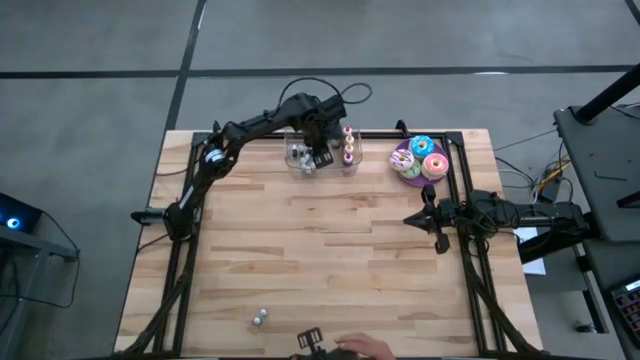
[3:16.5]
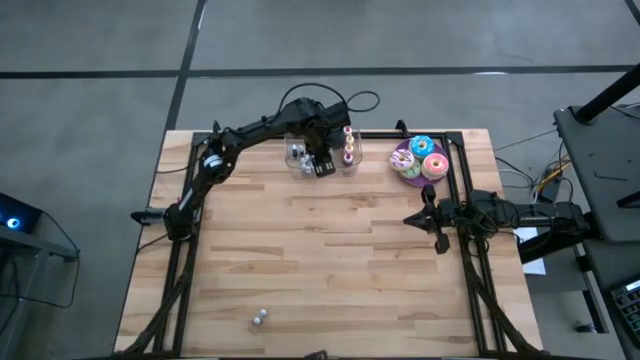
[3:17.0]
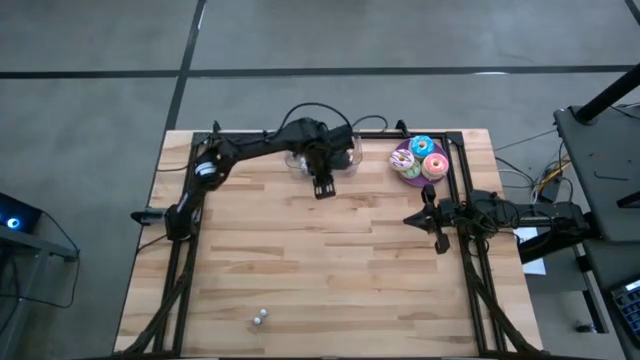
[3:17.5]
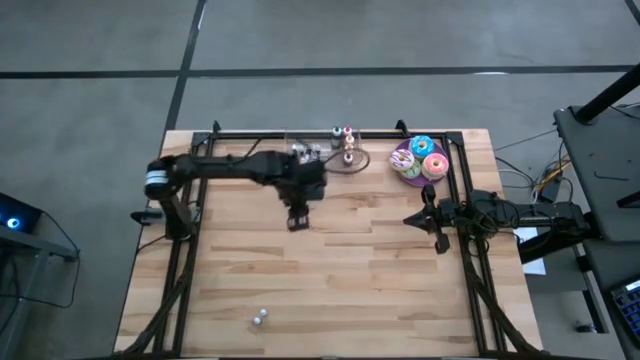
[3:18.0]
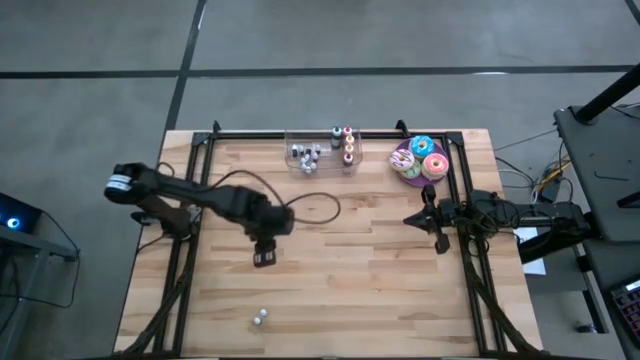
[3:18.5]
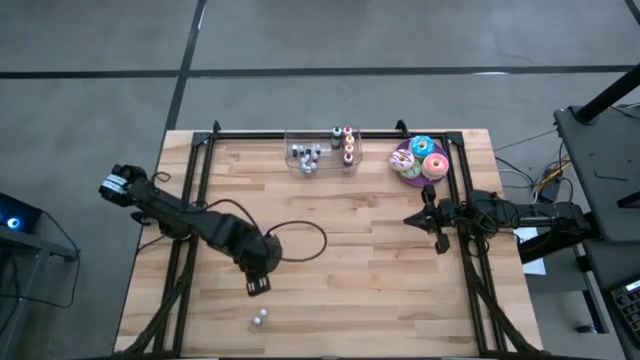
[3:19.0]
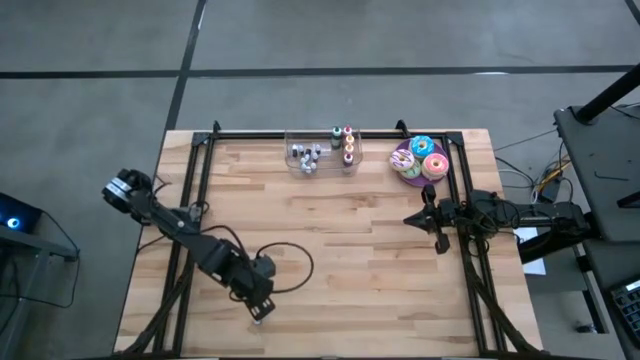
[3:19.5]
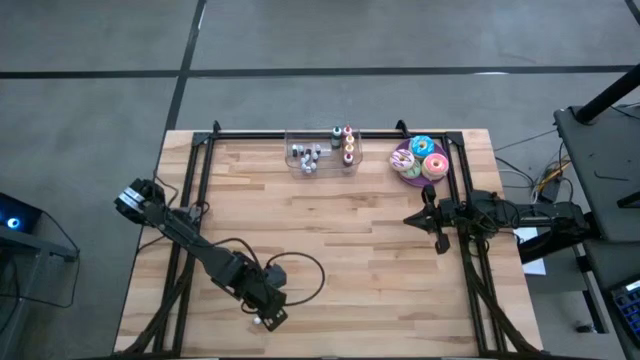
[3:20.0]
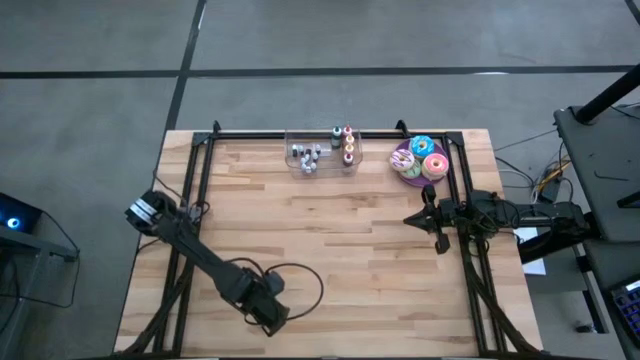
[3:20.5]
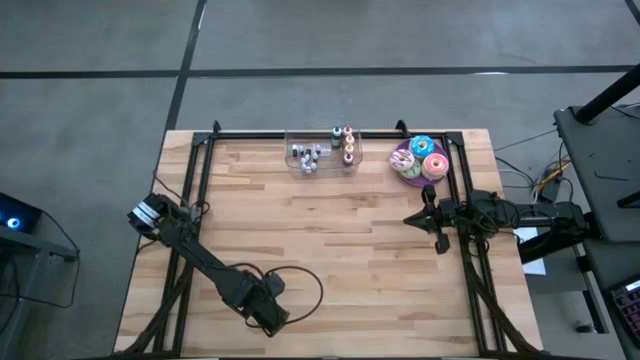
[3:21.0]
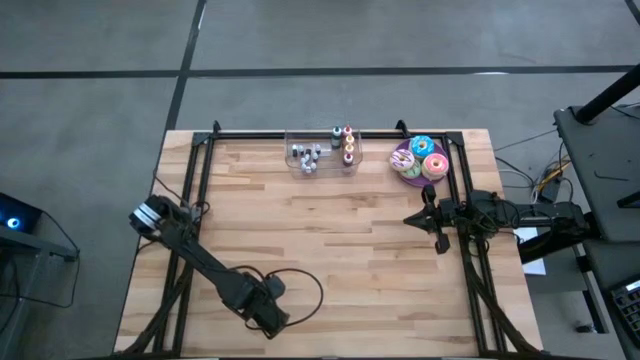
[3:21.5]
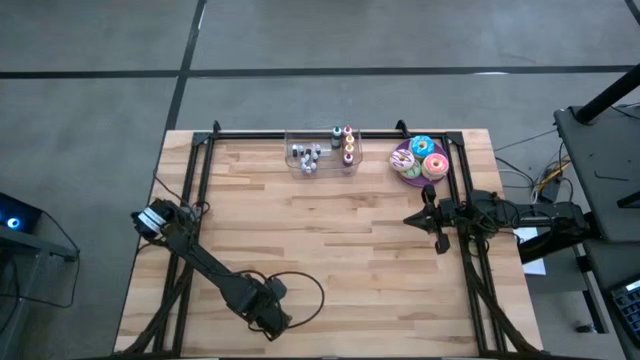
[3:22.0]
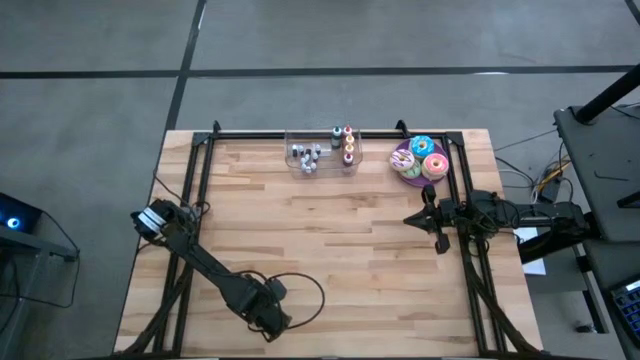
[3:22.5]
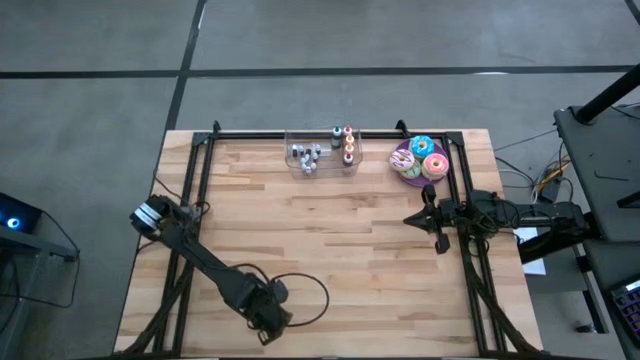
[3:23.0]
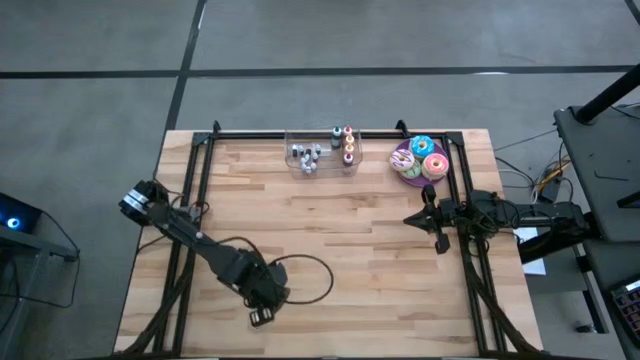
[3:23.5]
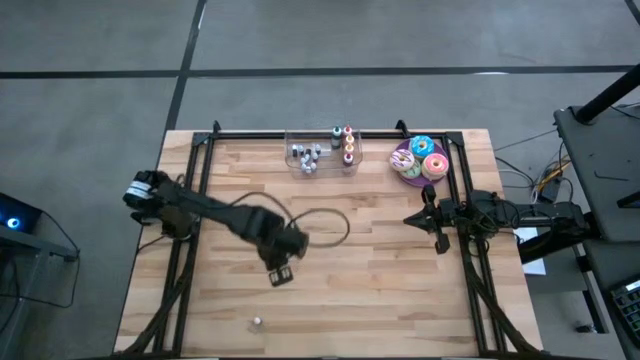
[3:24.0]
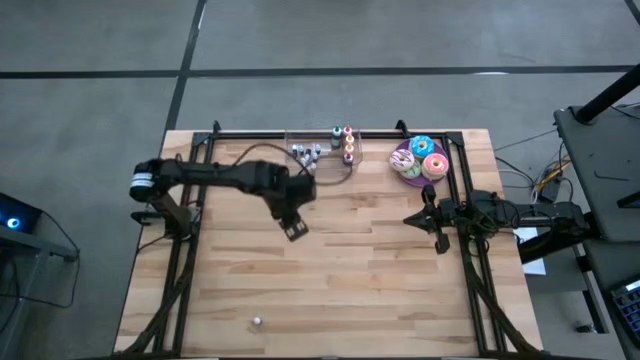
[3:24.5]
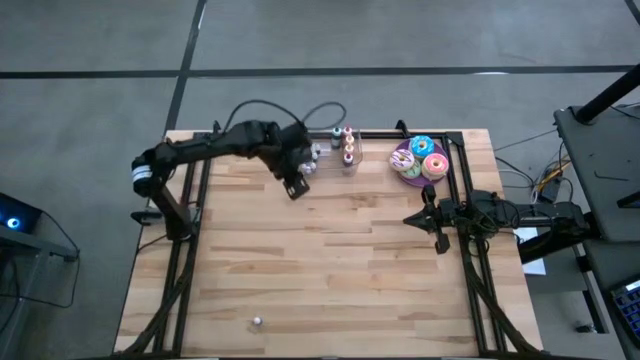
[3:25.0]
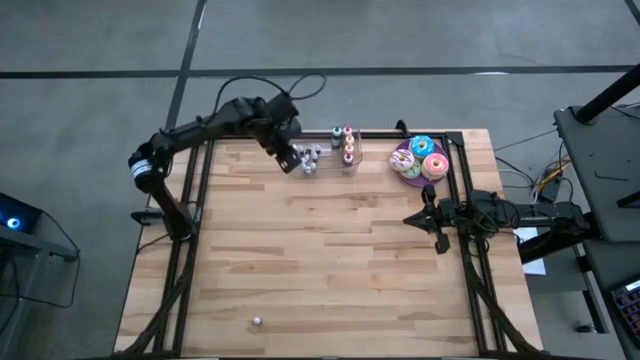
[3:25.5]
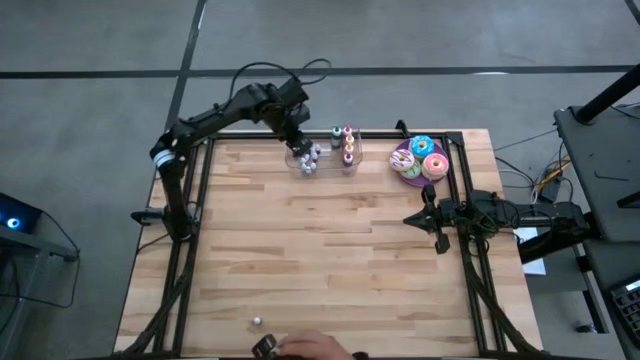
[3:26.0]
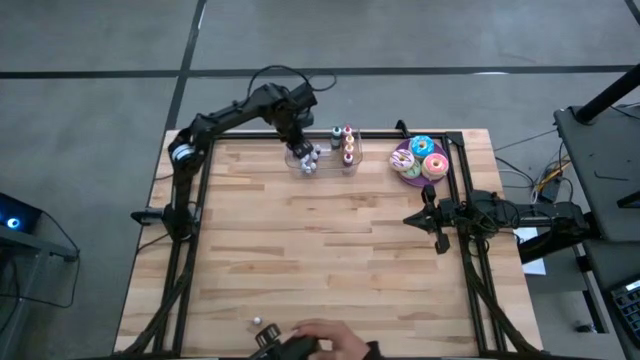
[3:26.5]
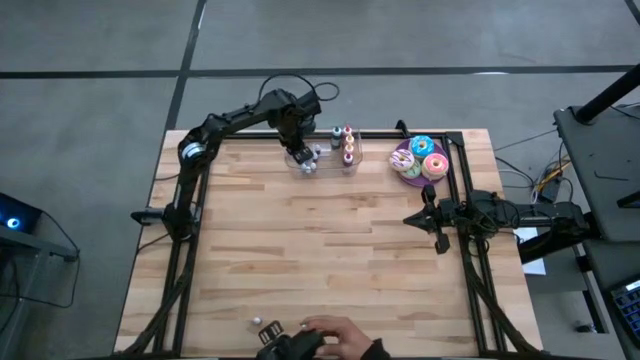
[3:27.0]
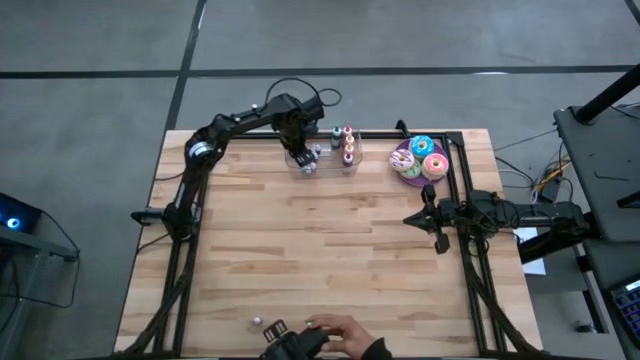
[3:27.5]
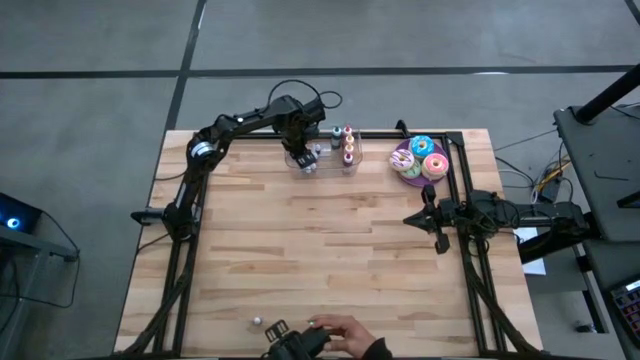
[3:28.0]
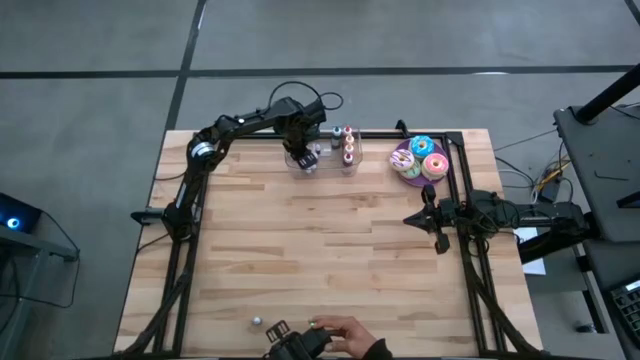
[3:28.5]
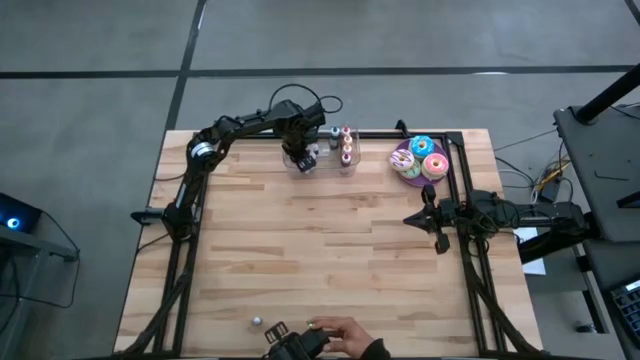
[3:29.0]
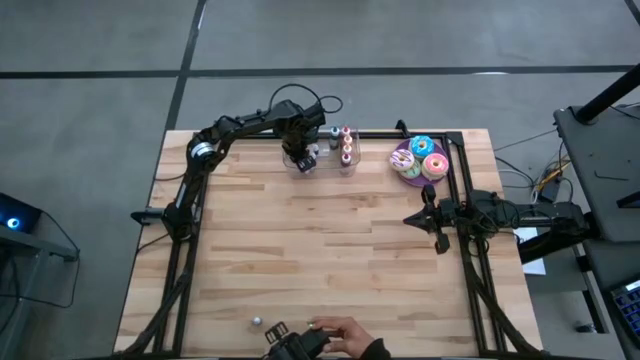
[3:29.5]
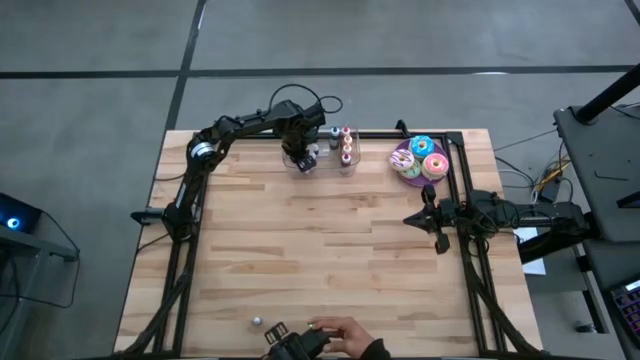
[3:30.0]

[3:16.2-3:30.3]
Task: Pick & Place food coloring
Put the small red food coloring bottle into the transparent bin

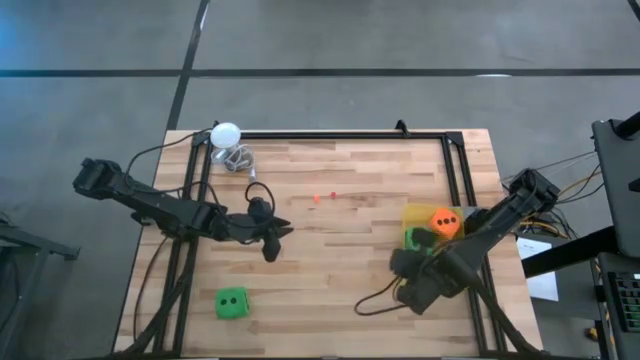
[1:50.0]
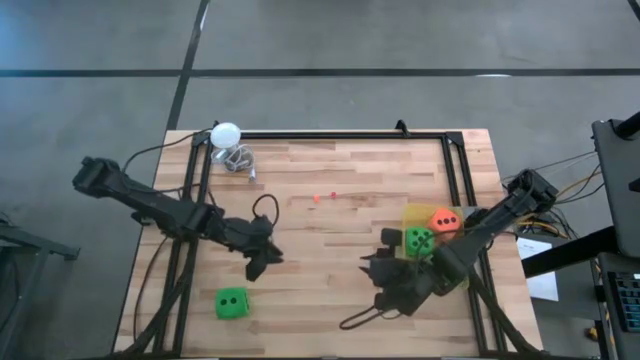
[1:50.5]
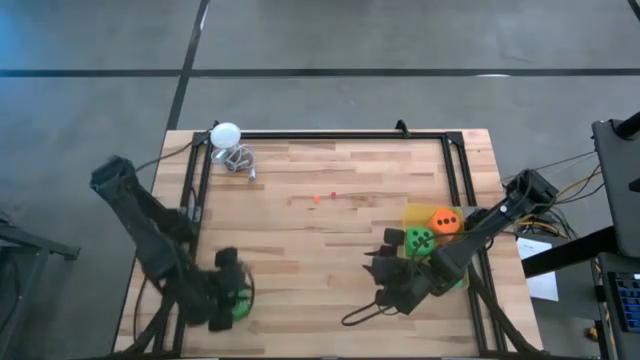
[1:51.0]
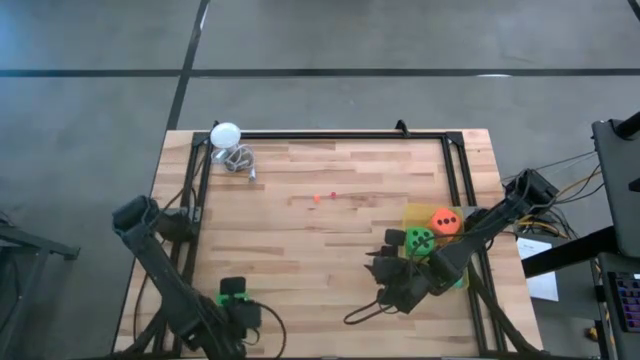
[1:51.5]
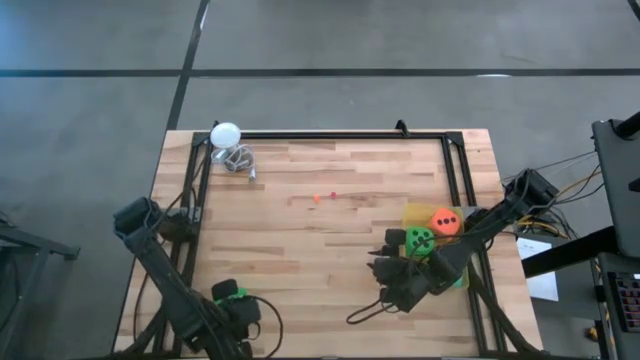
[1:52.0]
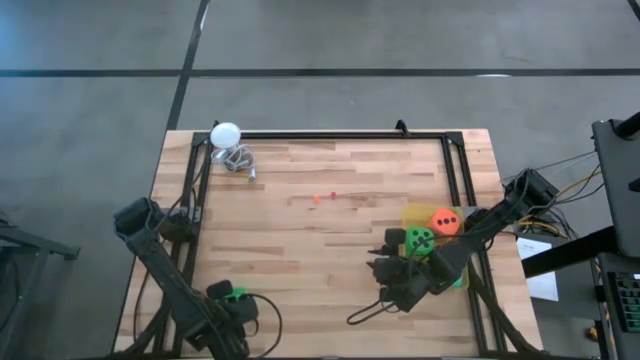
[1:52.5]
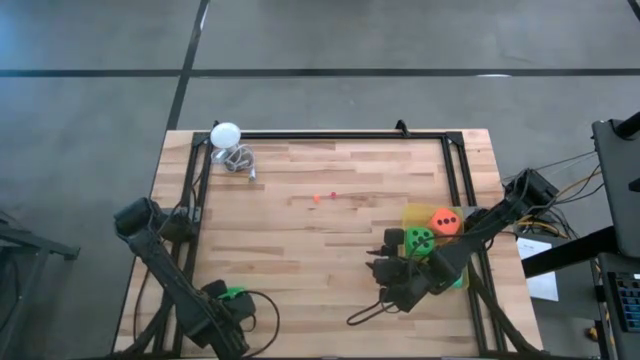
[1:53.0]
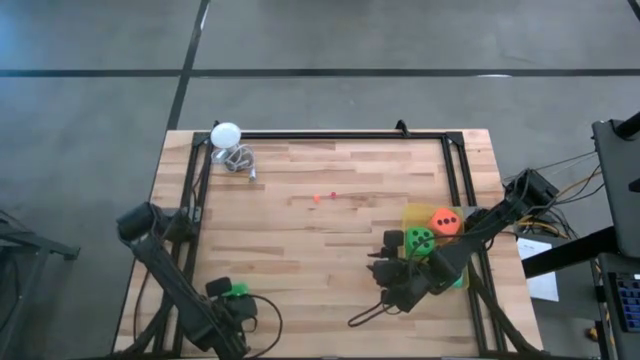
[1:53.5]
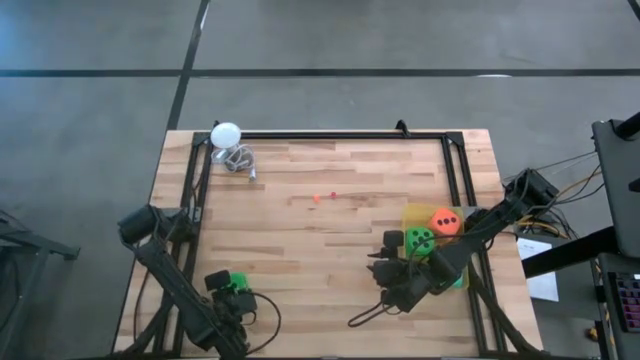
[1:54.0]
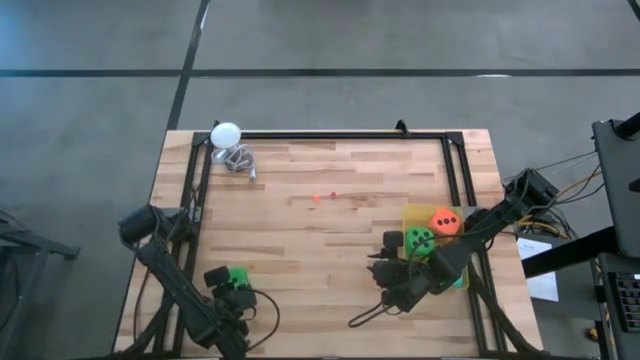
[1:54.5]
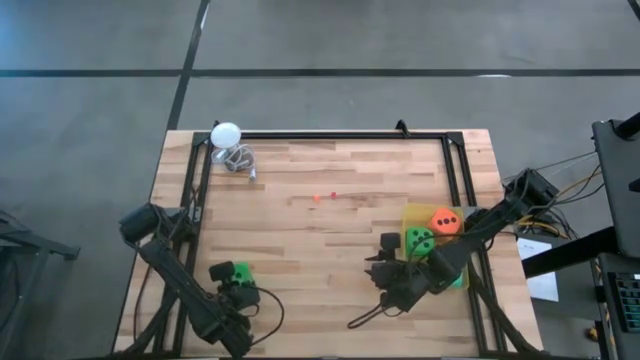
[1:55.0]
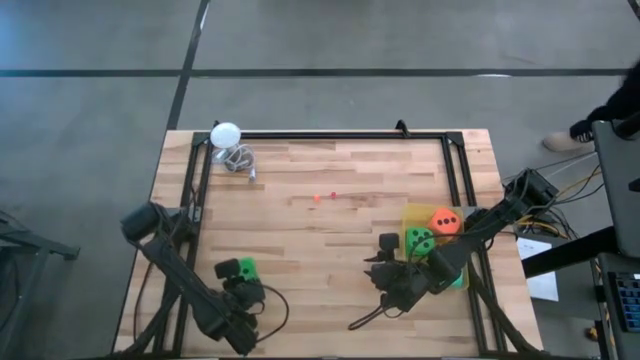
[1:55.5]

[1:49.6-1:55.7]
Task: Pick & Place Dice
Put the large green dice into the yellow bin
